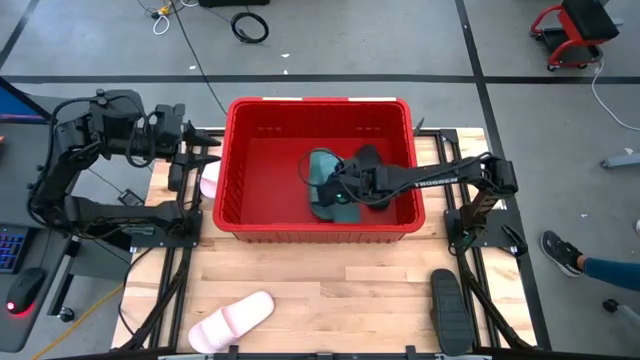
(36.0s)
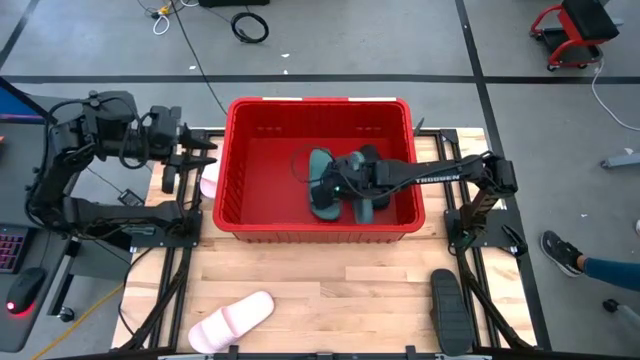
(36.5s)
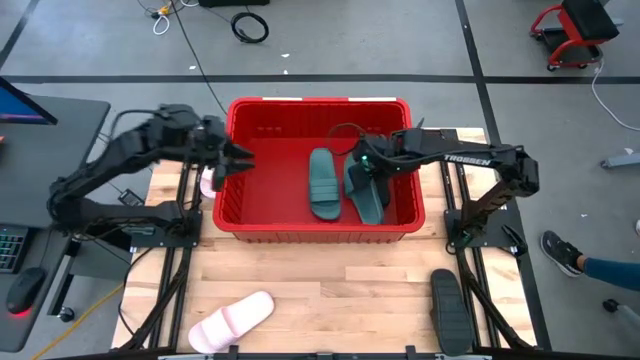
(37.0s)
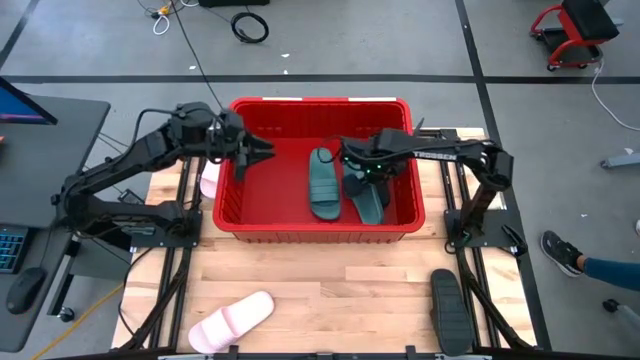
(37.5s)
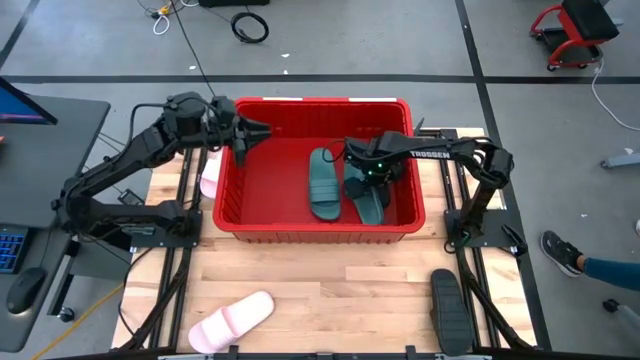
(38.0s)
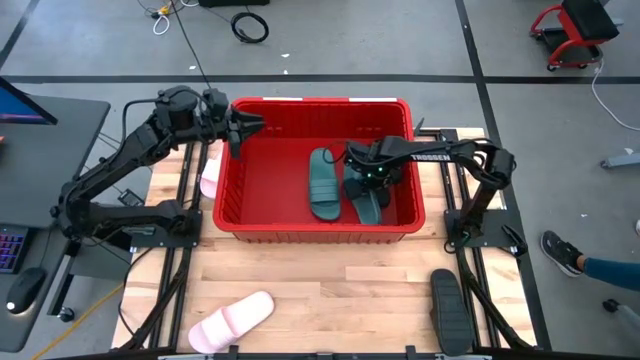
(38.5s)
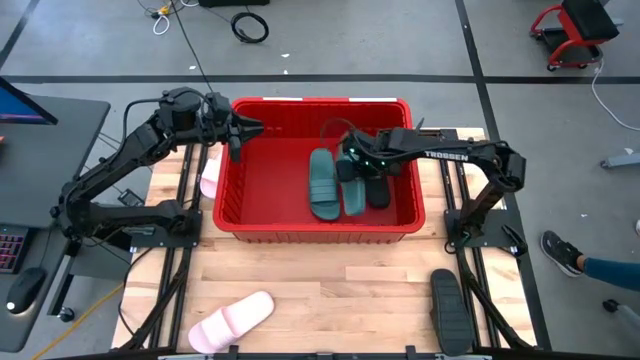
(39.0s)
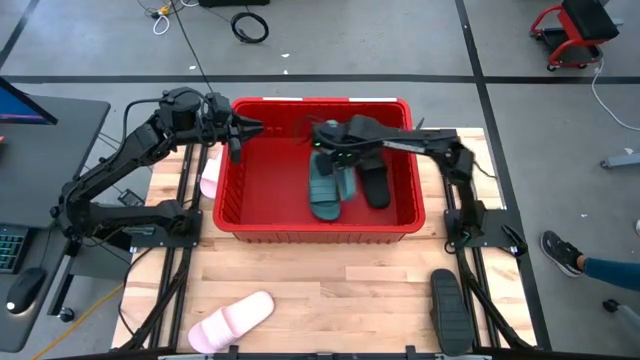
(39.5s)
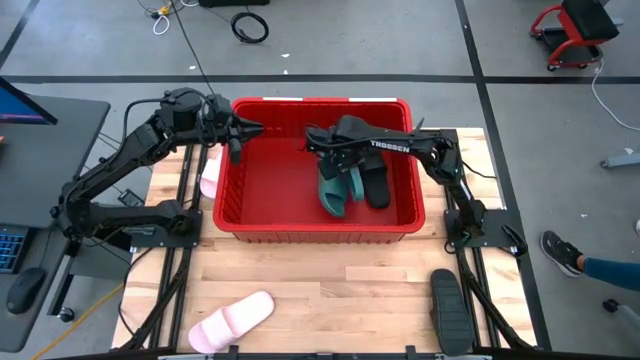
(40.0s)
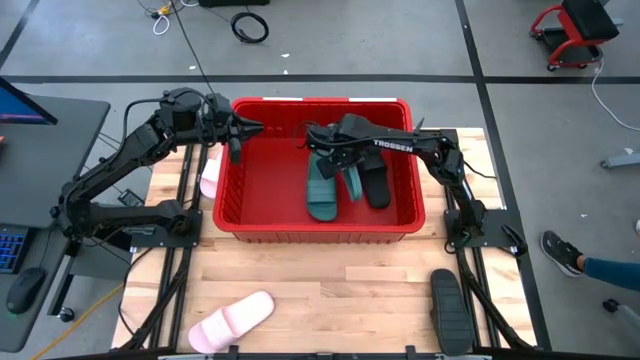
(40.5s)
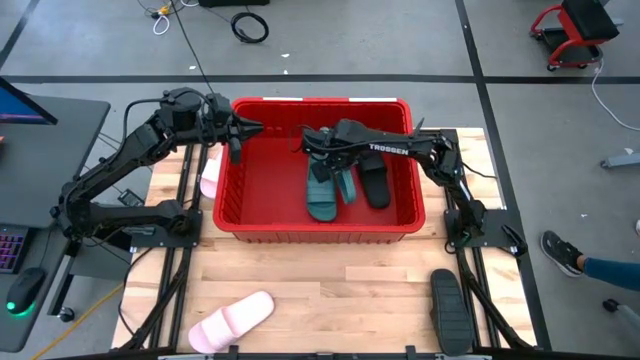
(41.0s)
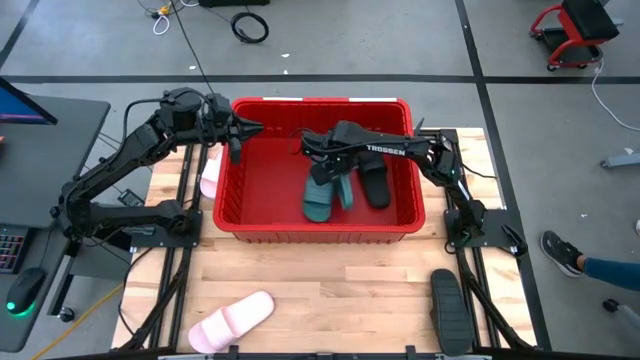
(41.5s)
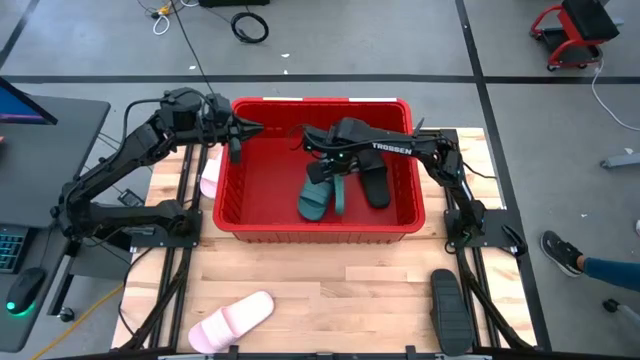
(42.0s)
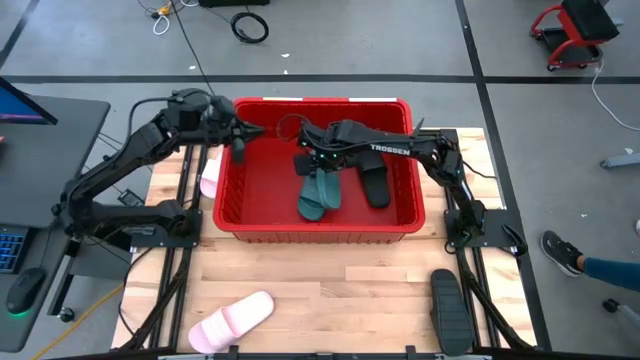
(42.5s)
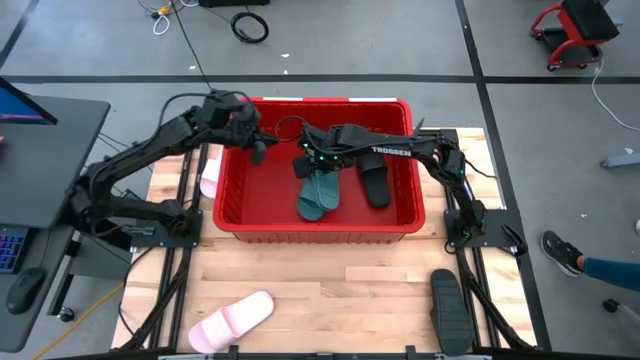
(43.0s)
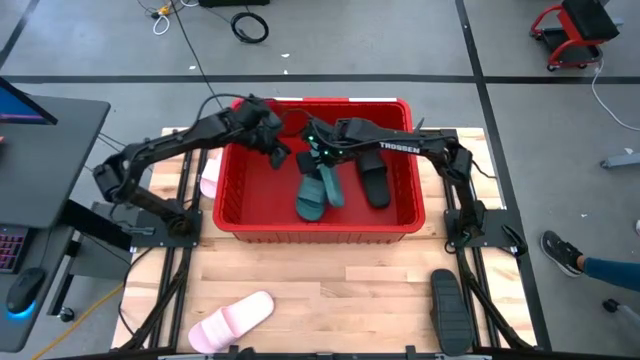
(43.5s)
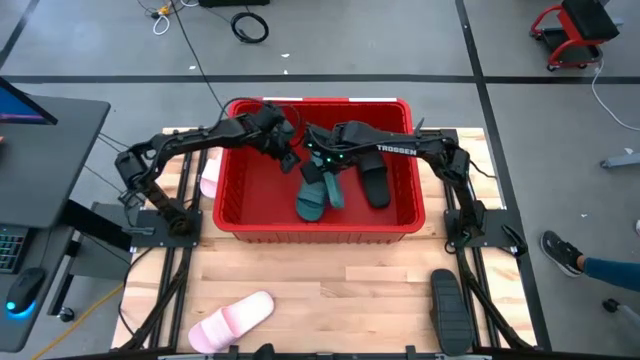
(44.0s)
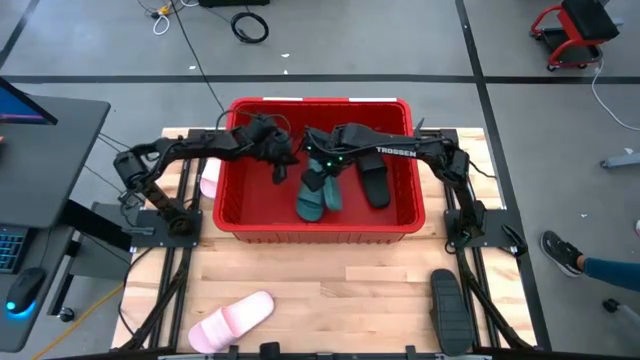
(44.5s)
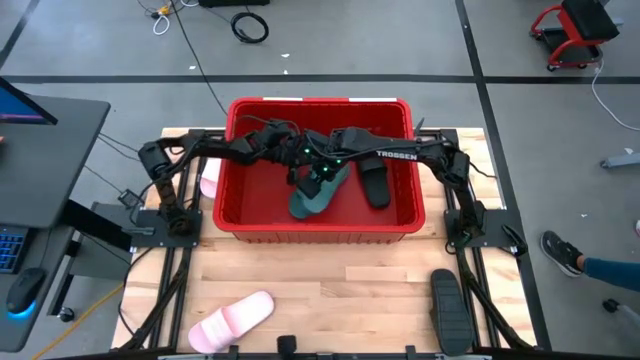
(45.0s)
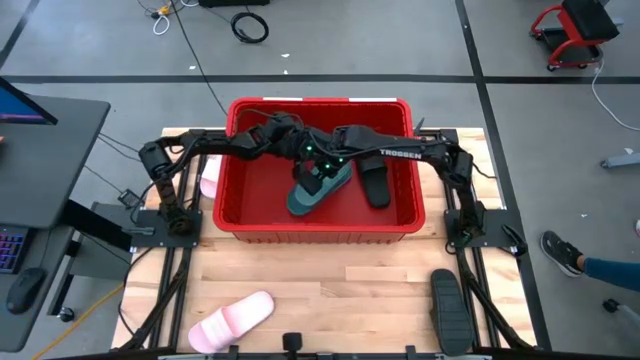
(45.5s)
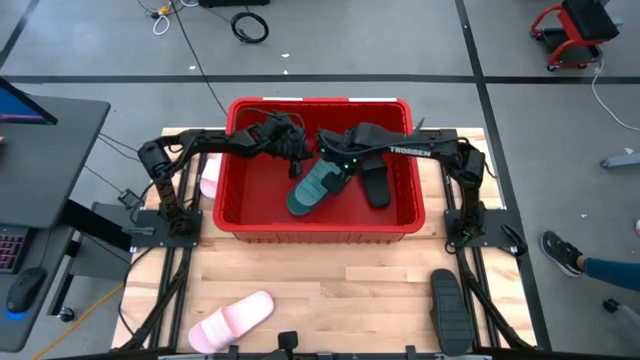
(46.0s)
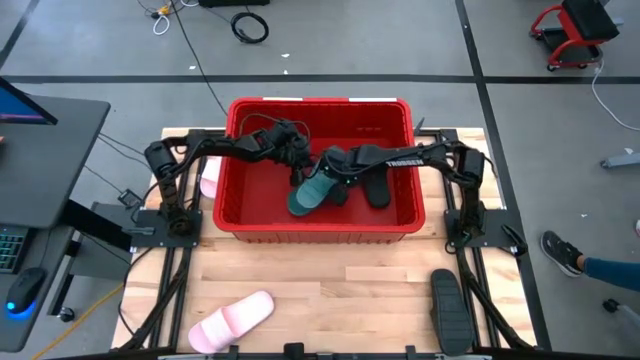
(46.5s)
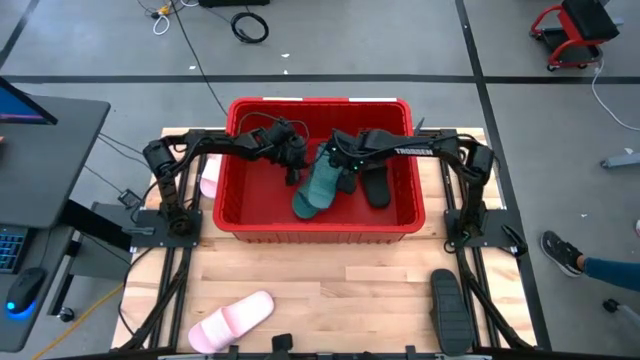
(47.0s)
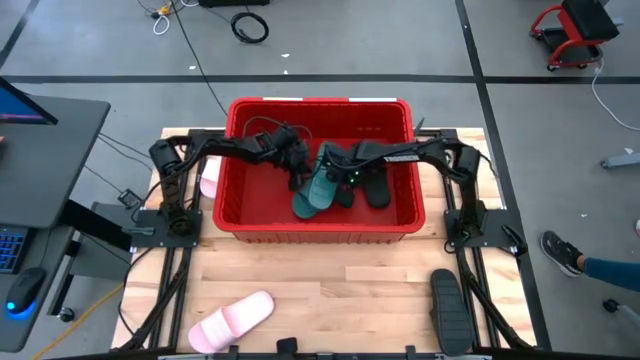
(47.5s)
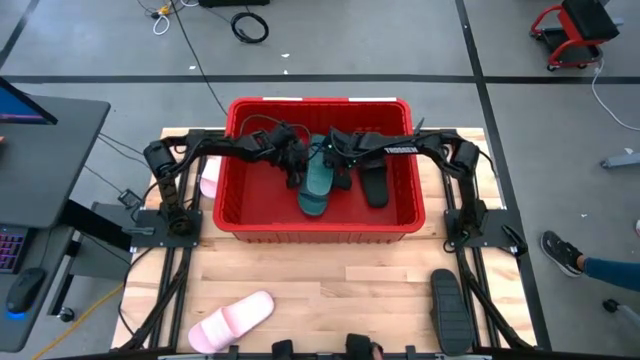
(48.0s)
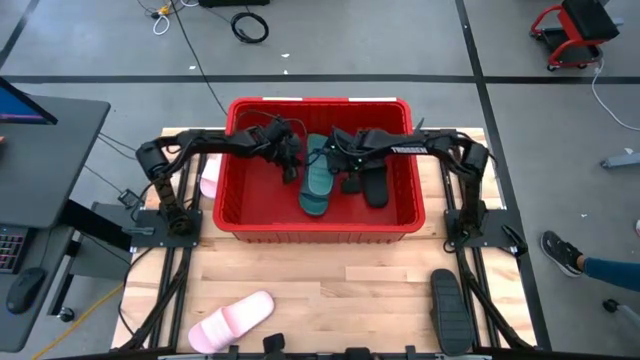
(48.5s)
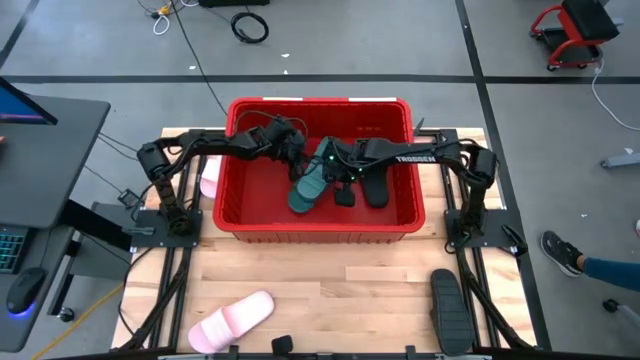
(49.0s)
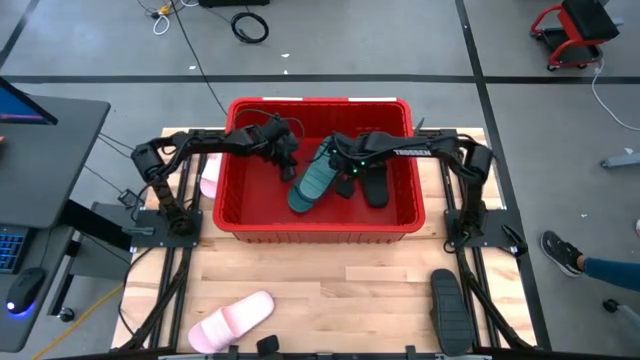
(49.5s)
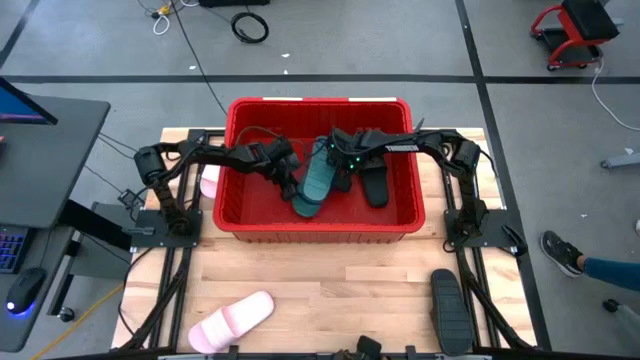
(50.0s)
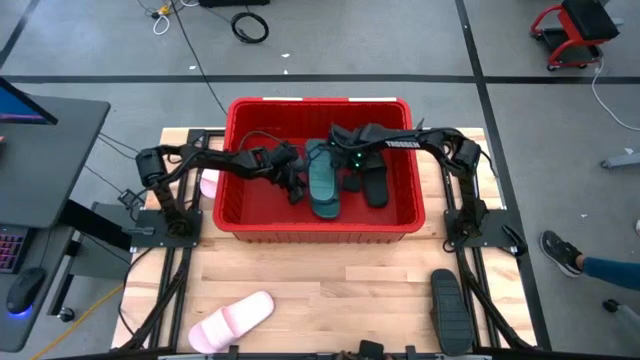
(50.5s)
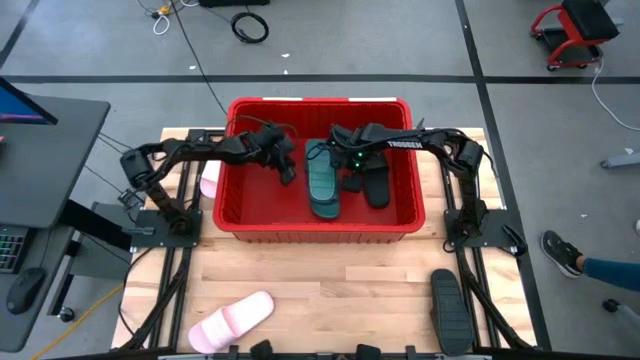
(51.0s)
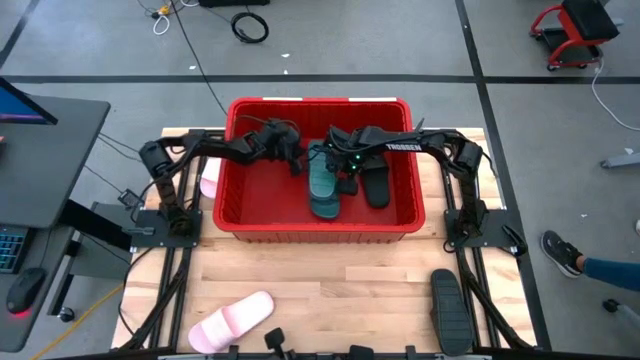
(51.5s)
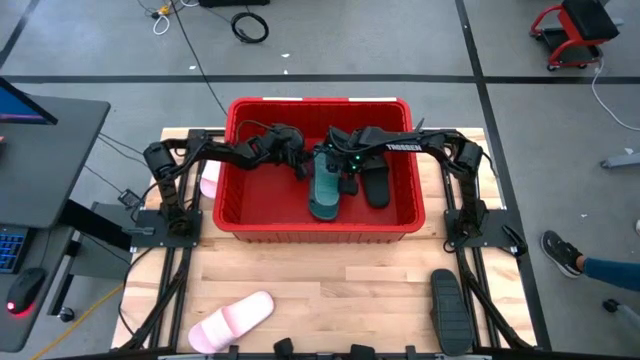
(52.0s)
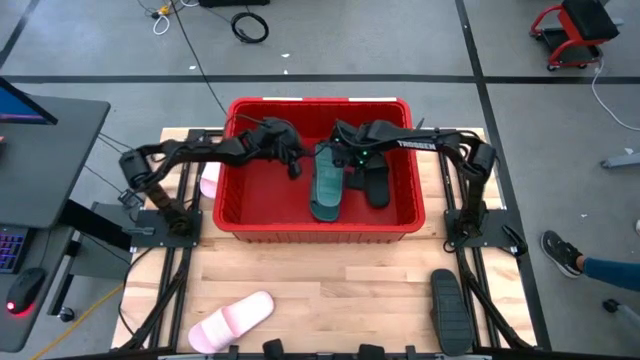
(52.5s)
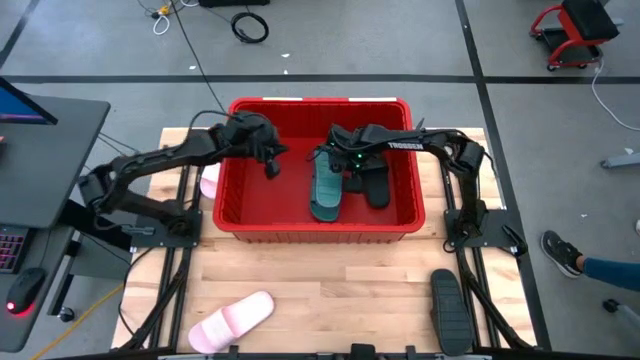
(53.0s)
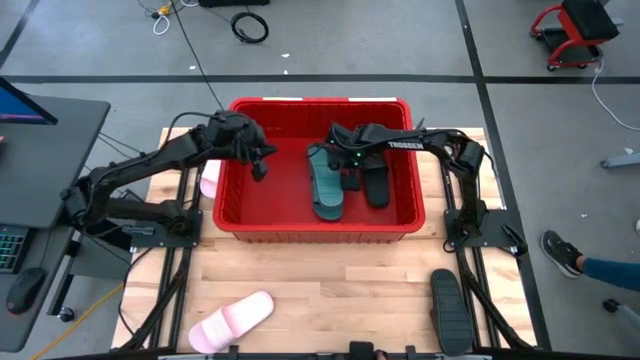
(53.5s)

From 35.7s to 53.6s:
Task: Pick and place slides into bin
Put the green slide into the red bin

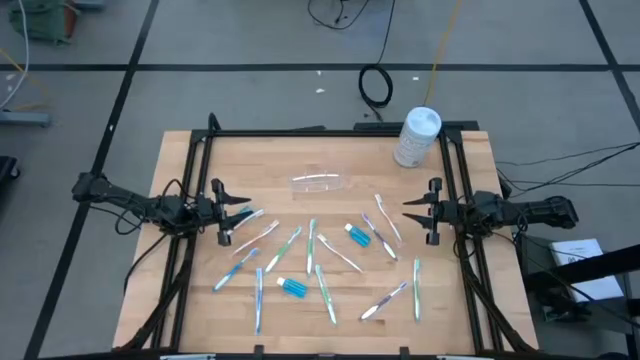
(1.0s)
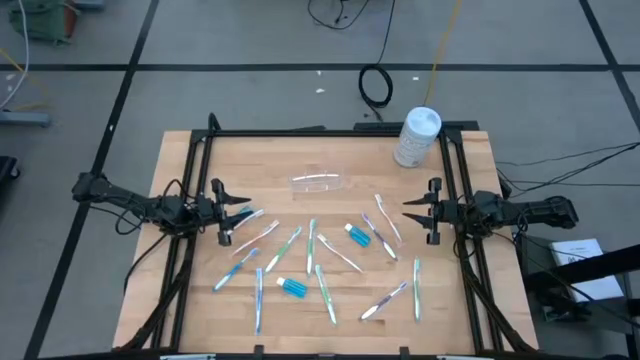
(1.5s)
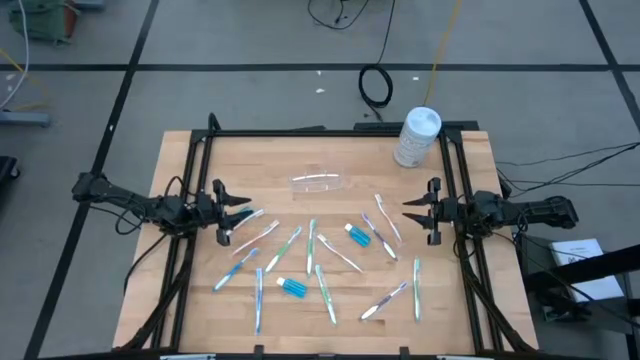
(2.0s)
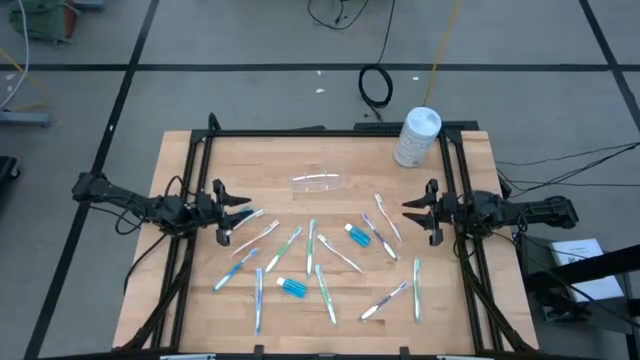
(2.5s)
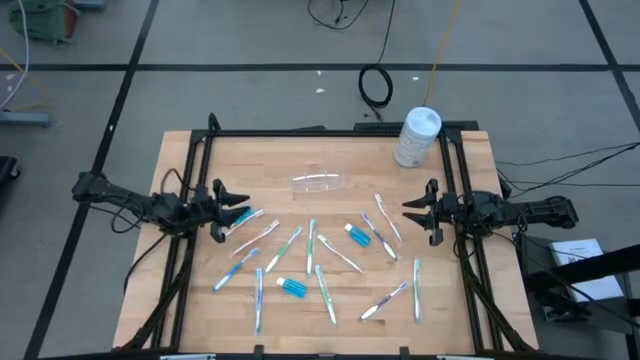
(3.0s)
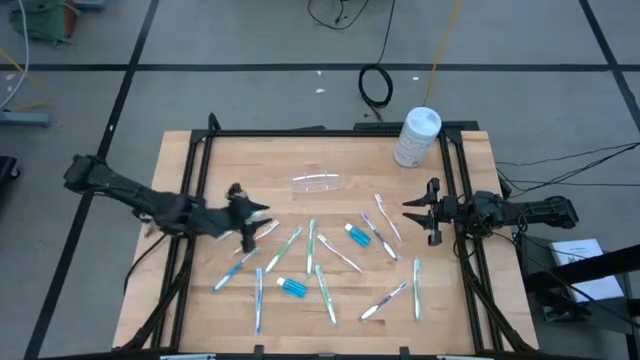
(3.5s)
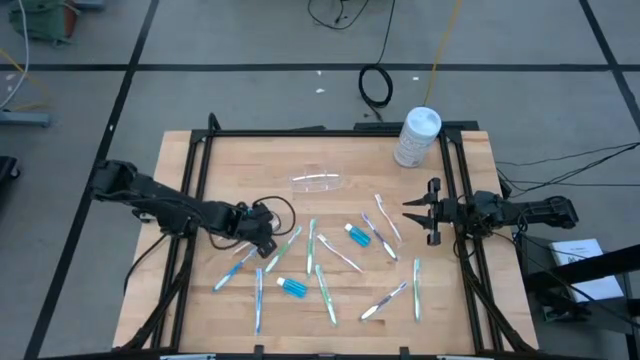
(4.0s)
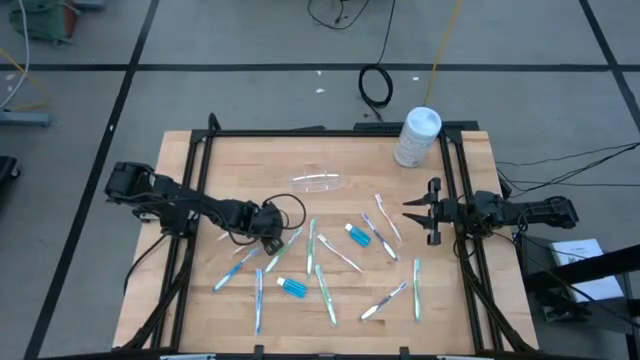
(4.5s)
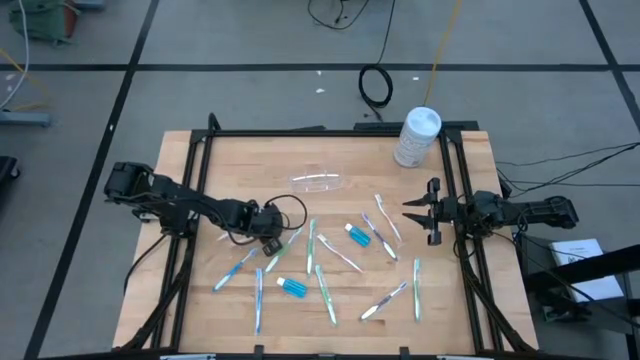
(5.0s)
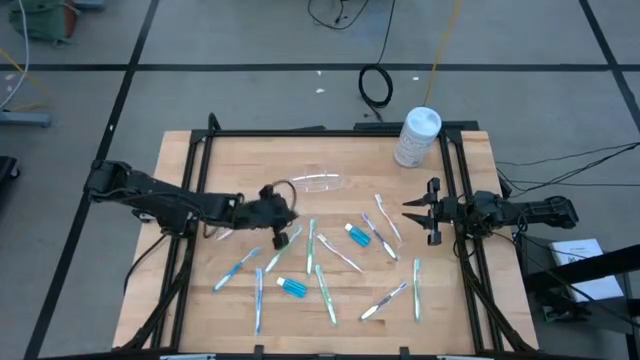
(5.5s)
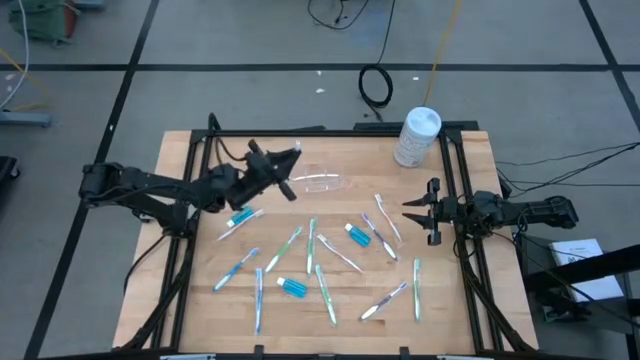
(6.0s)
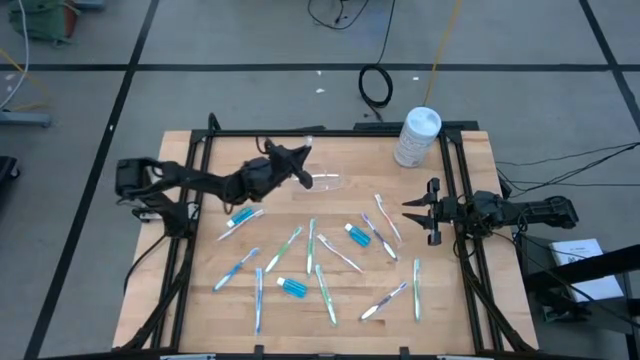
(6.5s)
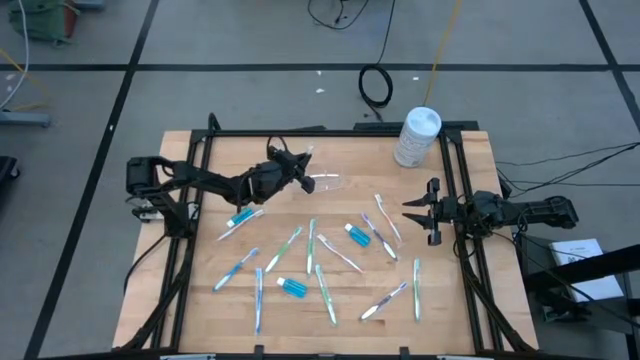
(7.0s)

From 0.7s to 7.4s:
Task: Pick & Place toothbrushing station
Put the orange toothbrush into the transparent organizer
